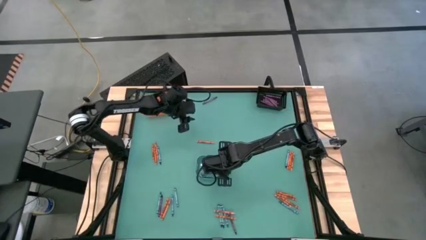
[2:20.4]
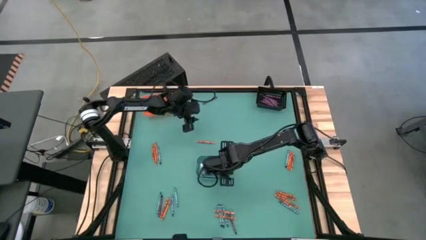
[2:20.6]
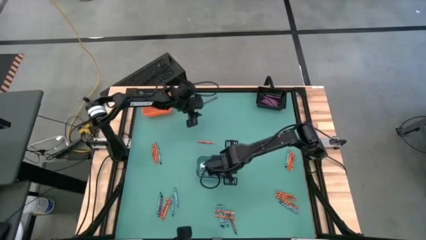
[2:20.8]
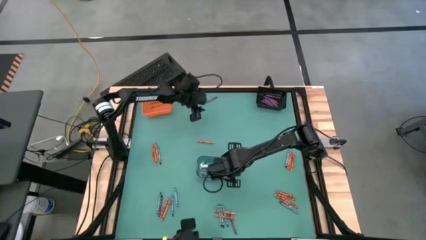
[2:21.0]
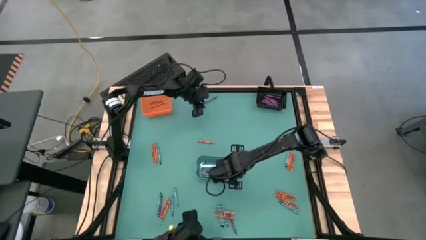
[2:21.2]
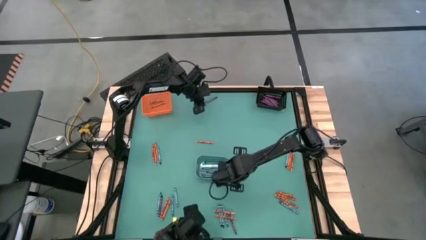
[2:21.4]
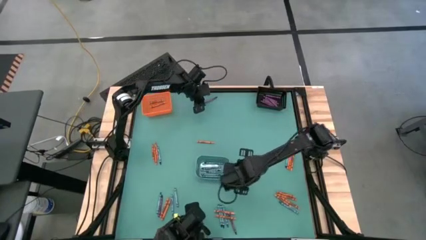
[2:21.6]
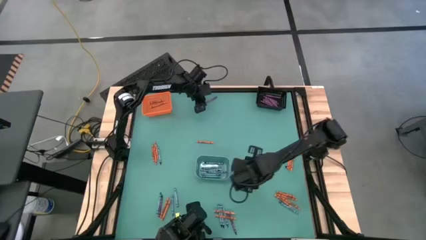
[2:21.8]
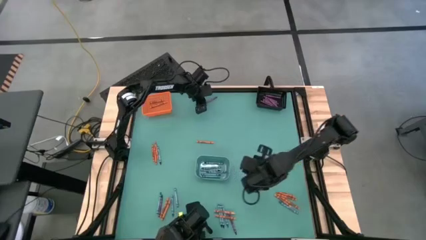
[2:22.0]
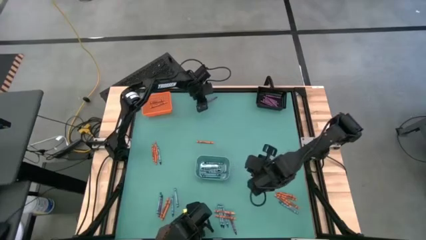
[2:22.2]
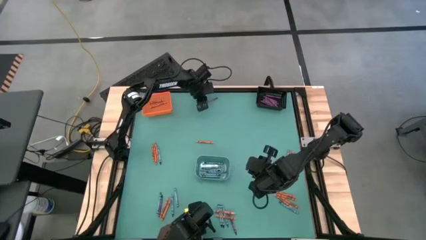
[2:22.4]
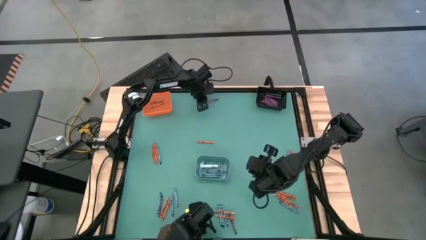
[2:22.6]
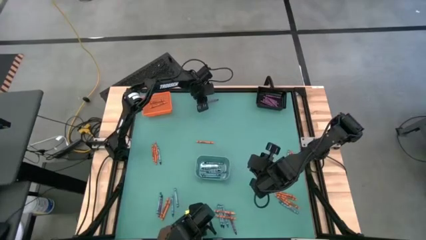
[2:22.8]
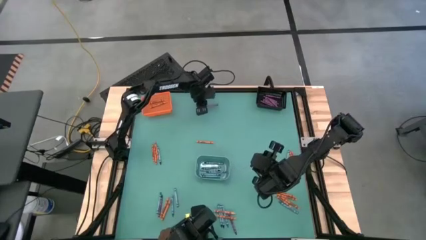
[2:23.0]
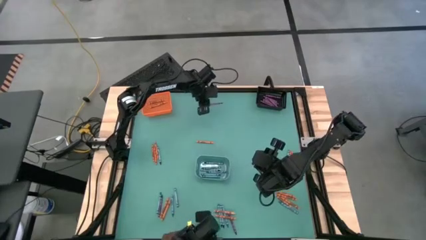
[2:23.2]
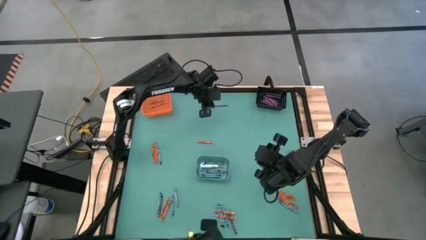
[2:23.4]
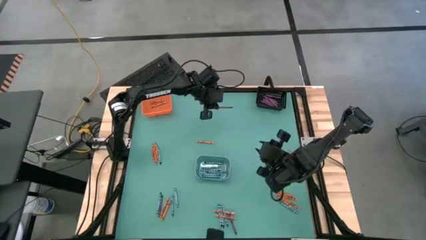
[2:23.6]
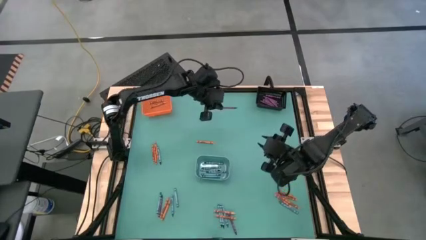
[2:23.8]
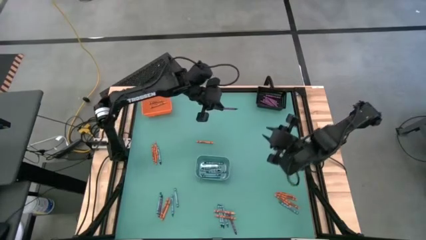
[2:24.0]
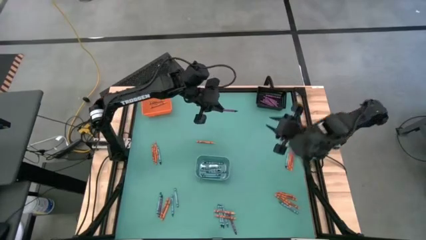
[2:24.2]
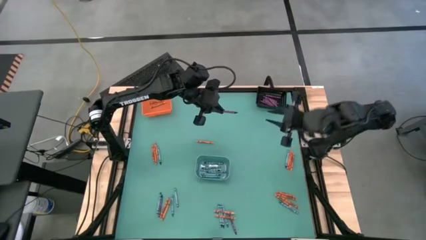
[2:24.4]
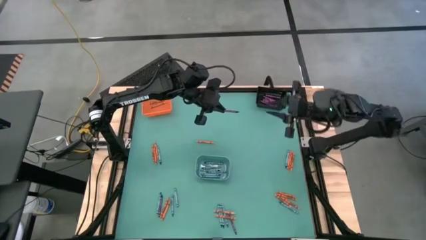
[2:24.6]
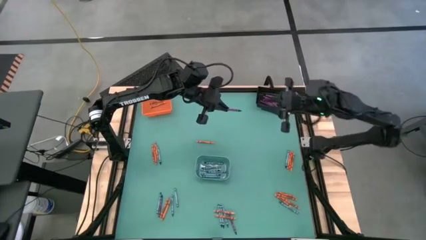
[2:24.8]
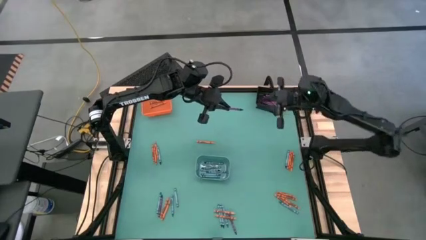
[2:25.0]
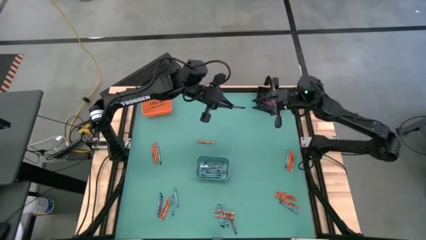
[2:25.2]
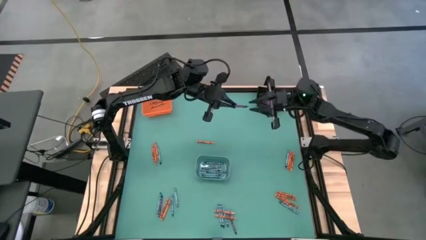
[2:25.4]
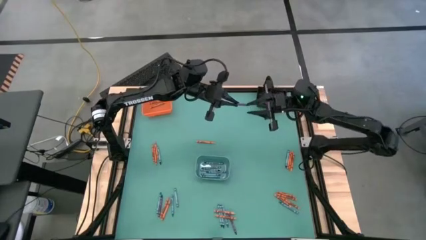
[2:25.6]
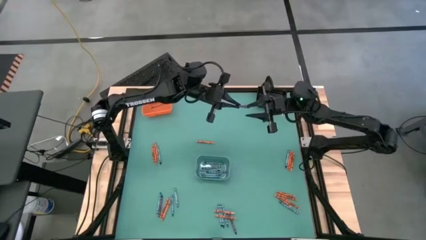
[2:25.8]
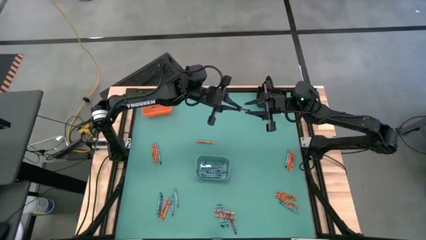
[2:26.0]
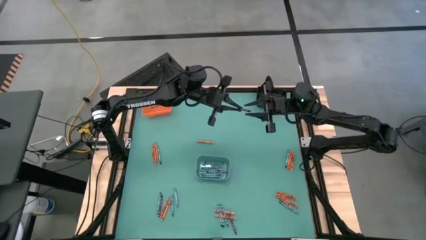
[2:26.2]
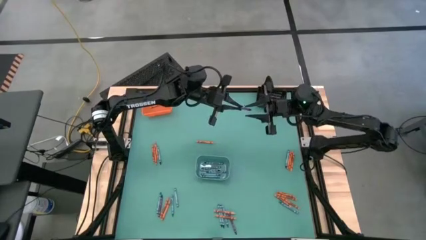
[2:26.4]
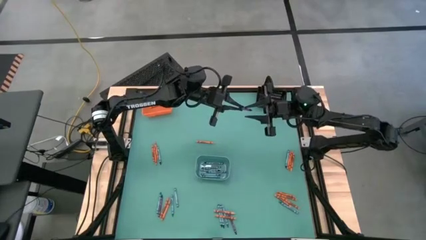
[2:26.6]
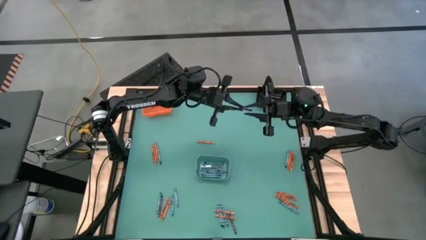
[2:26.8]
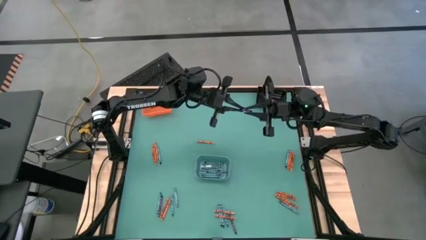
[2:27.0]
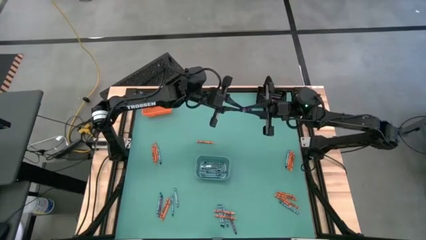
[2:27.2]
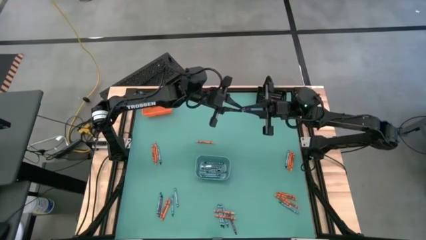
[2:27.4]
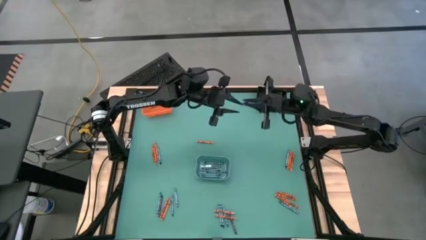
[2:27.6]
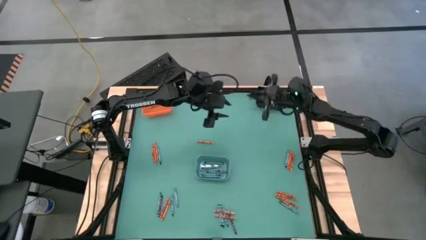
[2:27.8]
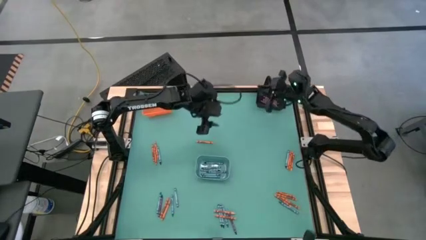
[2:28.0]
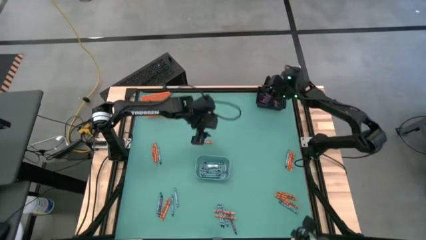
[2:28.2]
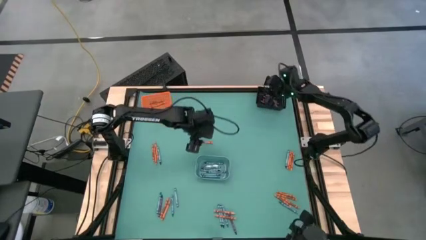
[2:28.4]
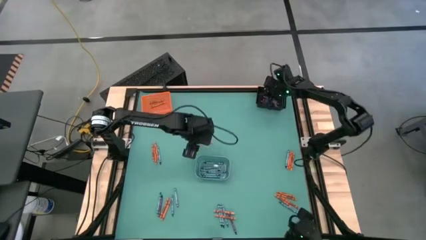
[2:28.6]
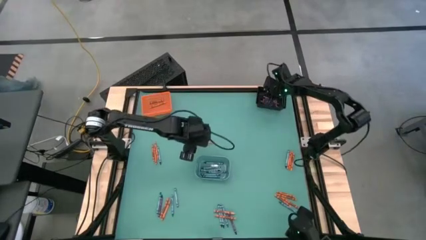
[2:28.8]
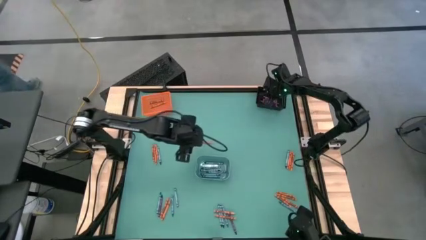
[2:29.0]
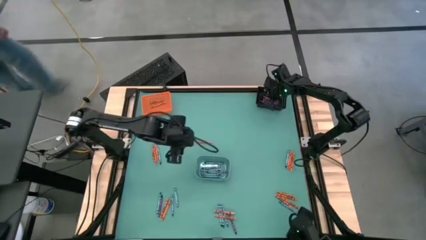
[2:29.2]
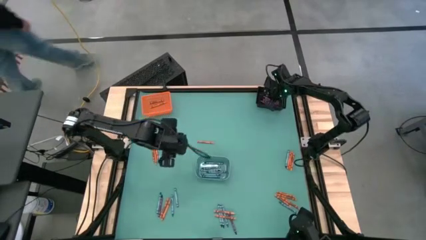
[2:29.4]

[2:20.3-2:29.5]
Task: Sort crayons
Put the violet crayon into the black bin

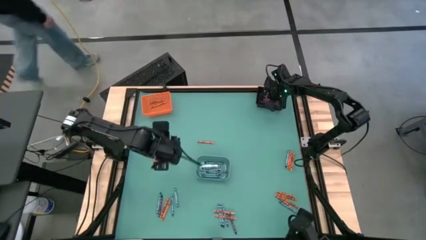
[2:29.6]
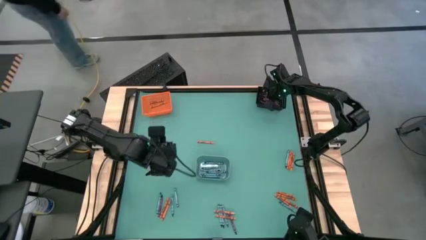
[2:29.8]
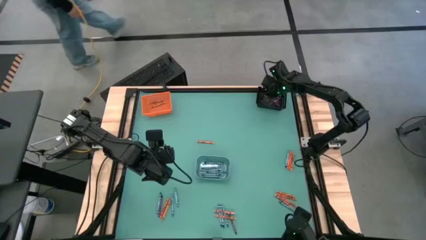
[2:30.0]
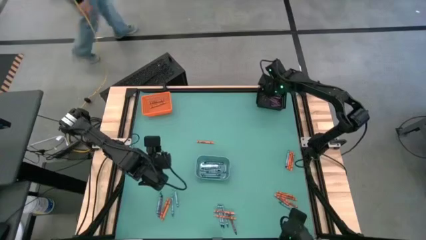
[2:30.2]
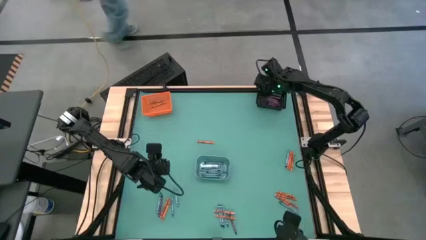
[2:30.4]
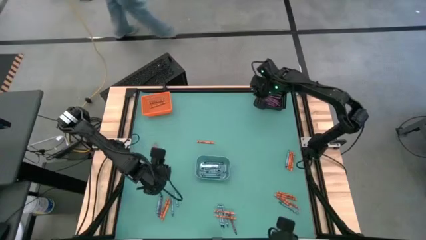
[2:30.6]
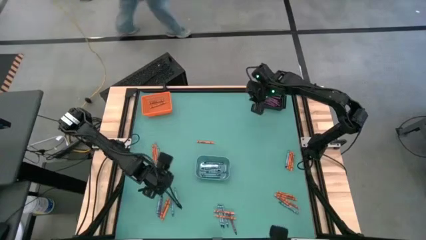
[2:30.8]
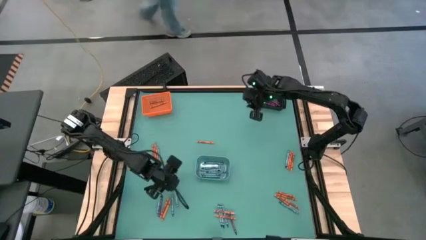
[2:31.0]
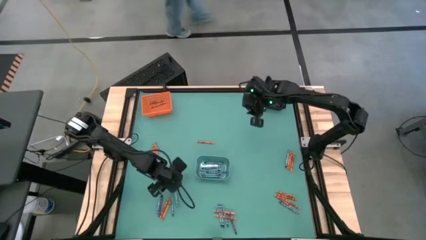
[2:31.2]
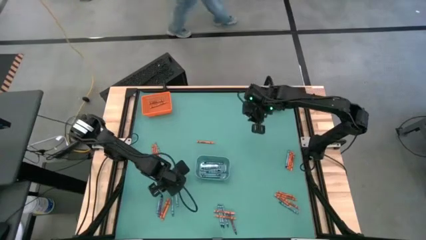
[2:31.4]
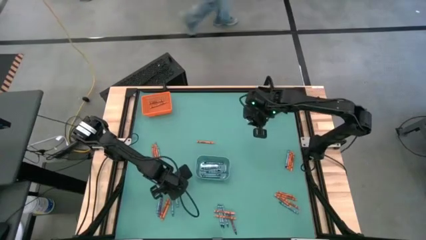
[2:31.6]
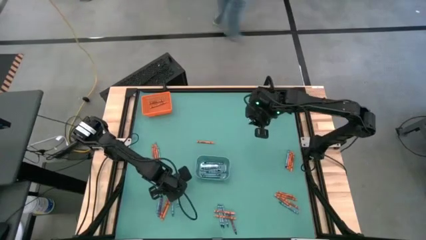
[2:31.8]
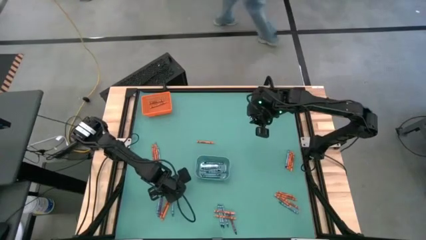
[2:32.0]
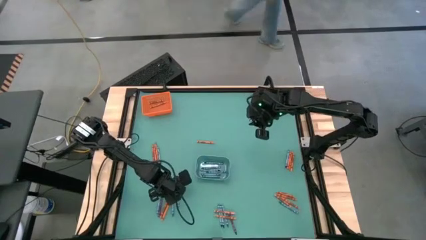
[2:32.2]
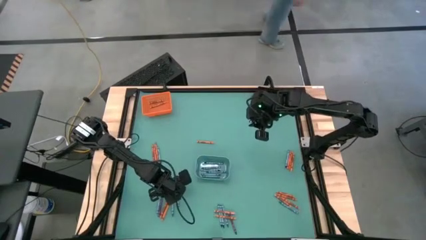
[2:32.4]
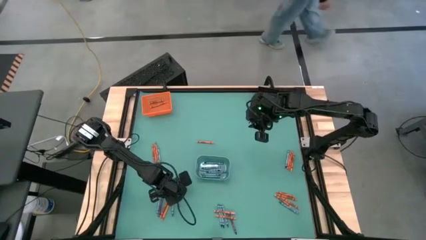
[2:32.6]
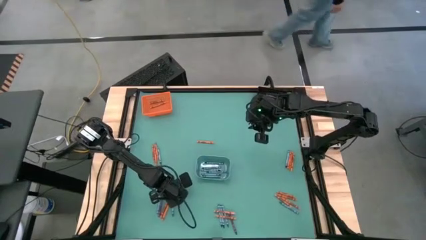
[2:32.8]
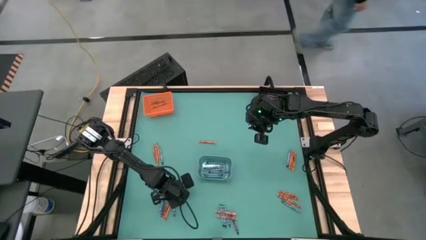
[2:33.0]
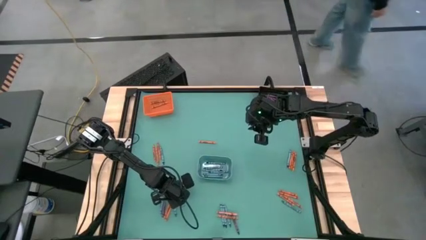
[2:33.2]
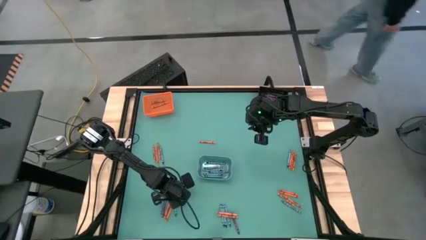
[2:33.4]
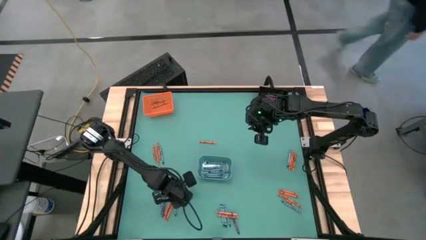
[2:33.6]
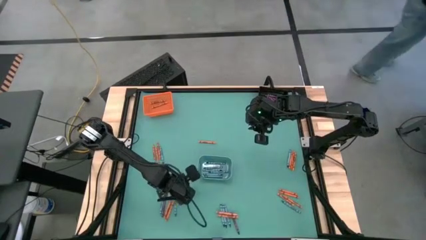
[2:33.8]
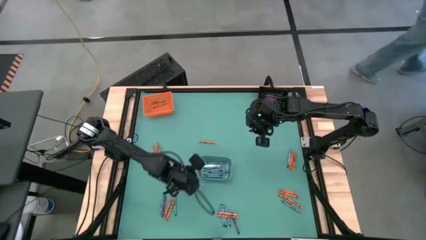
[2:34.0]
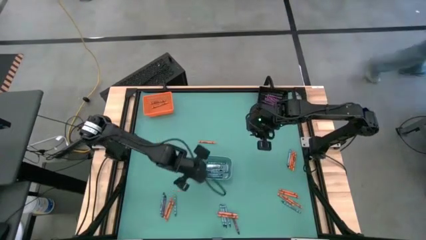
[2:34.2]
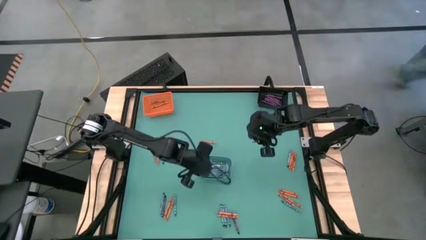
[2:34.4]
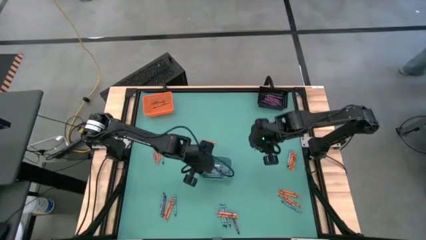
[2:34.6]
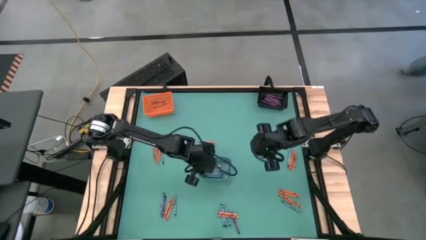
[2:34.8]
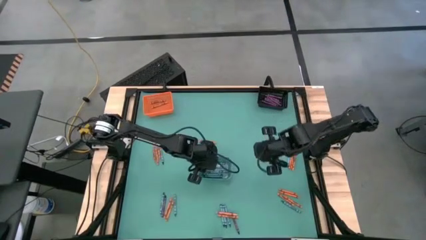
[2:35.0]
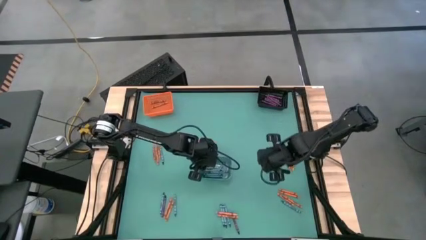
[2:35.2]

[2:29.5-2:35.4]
Put the blue crayon into the blue bin

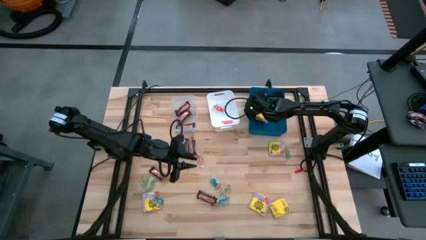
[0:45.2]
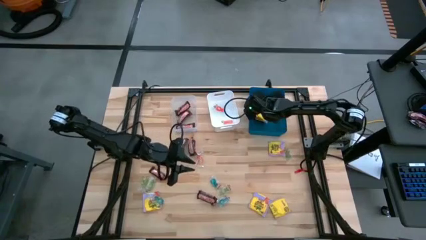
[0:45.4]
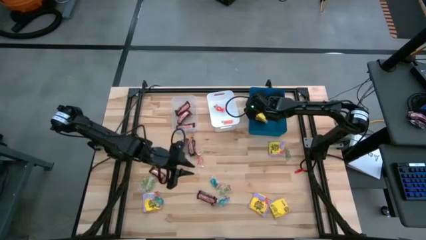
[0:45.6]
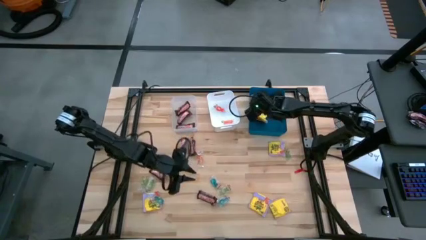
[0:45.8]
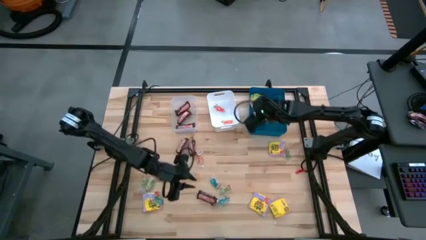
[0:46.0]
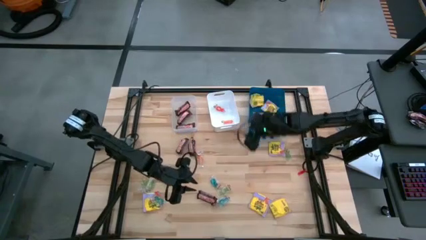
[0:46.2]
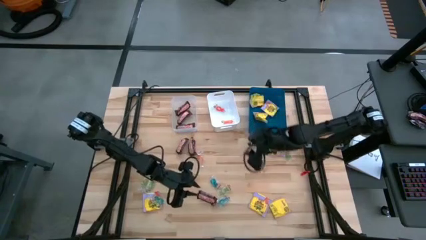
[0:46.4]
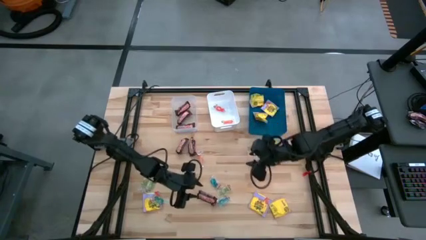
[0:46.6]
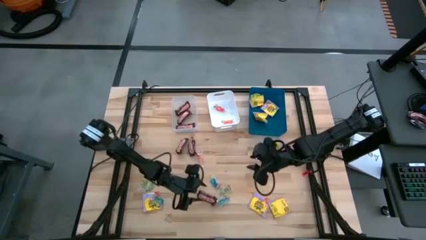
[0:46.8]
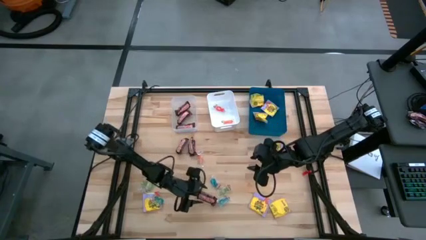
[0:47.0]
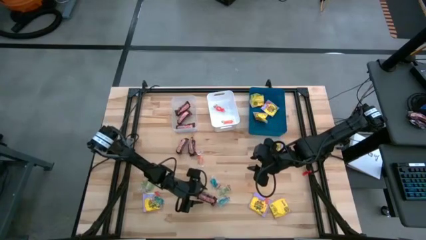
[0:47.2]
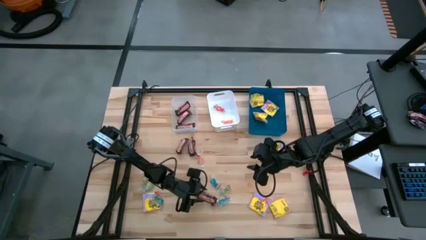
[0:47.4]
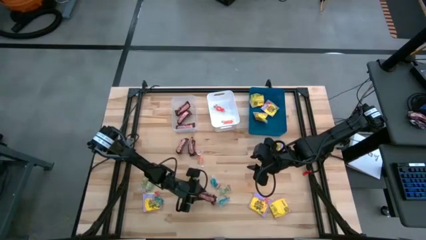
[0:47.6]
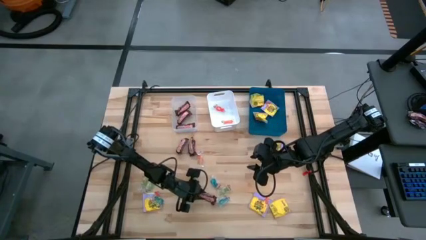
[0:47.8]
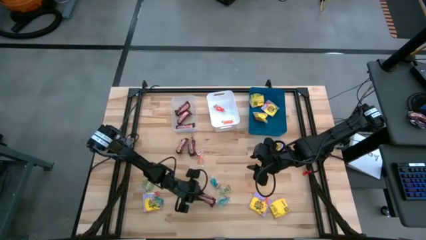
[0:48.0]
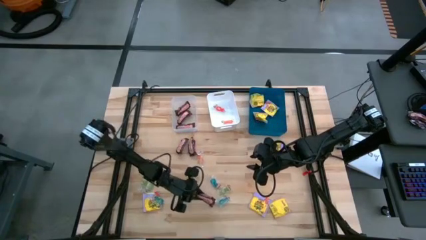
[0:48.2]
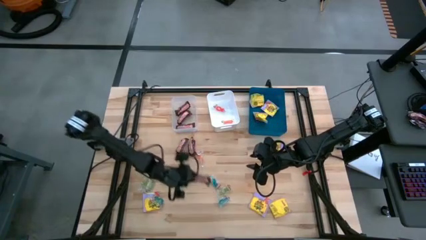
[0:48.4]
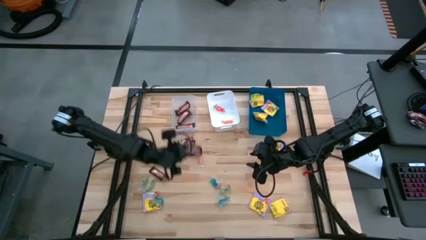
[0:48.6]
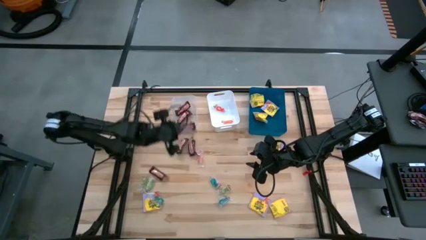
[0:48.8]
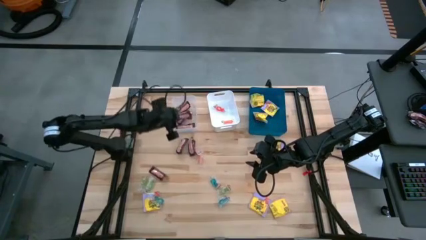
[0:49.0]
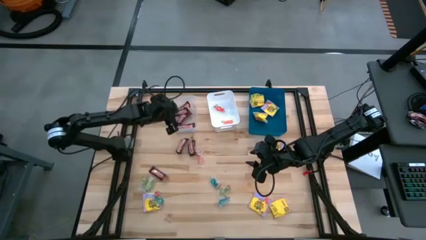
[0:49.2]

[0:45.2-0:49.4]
Task: Sort candy
Put the bottom center brown candy bar into the transparent bin
